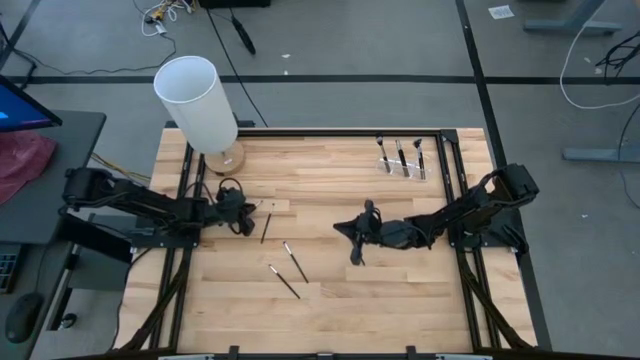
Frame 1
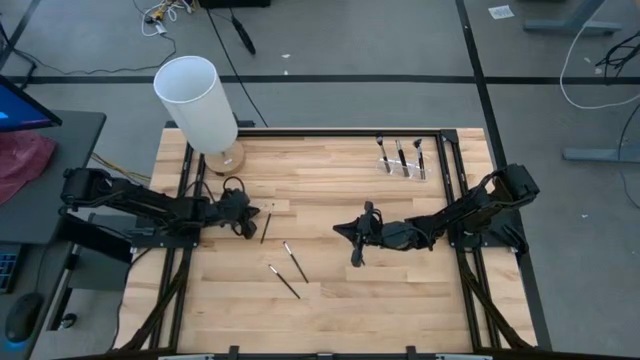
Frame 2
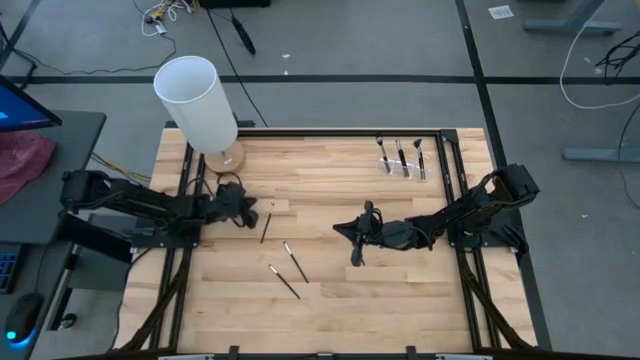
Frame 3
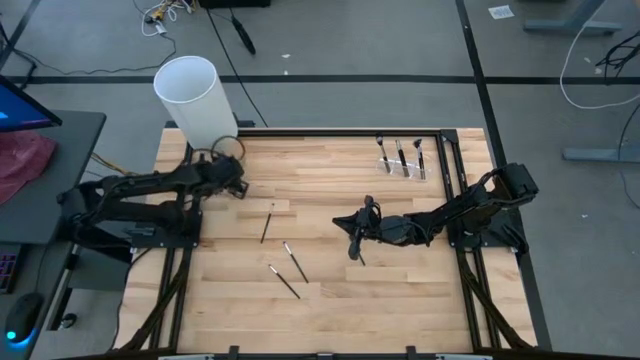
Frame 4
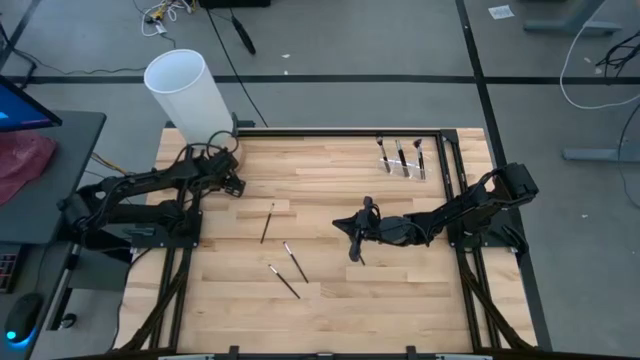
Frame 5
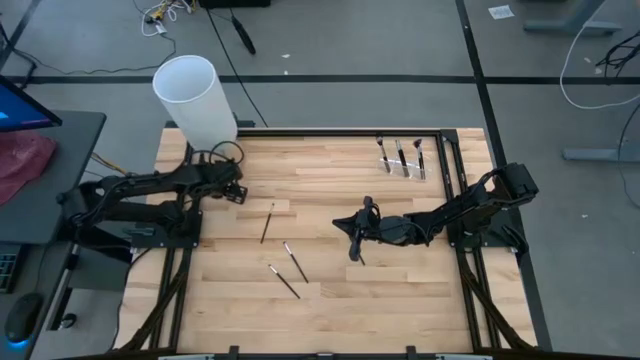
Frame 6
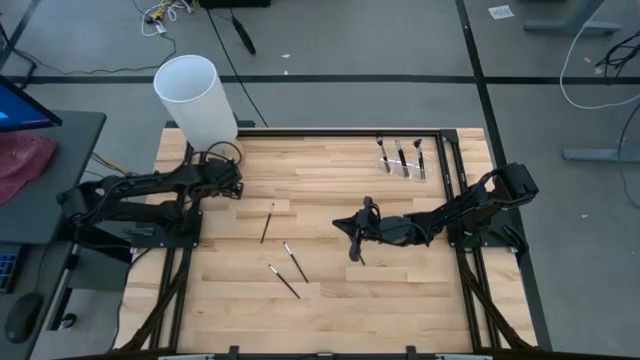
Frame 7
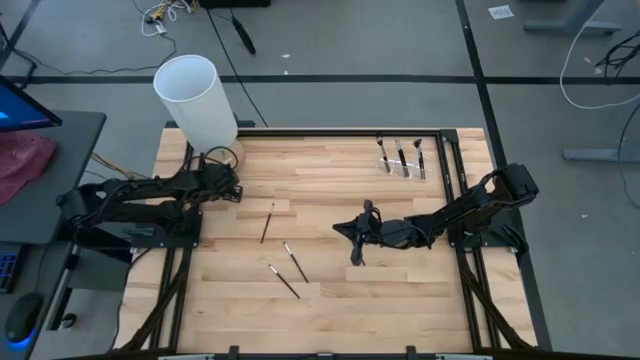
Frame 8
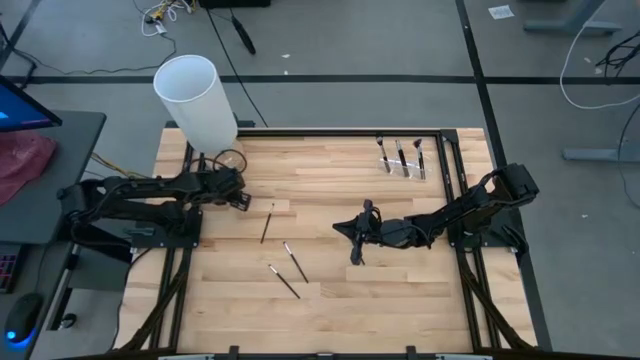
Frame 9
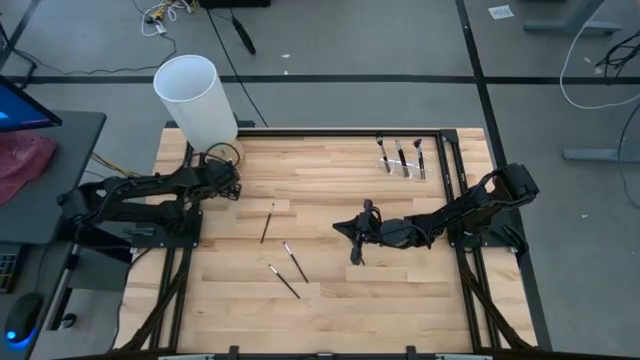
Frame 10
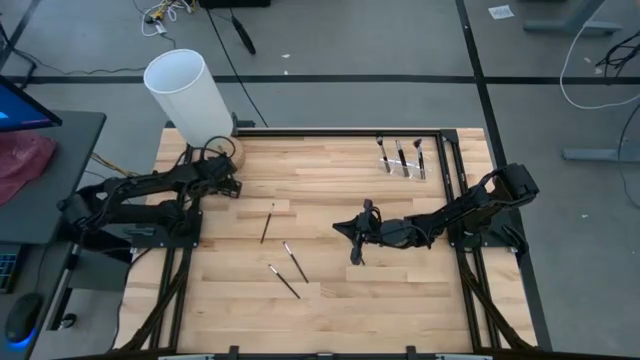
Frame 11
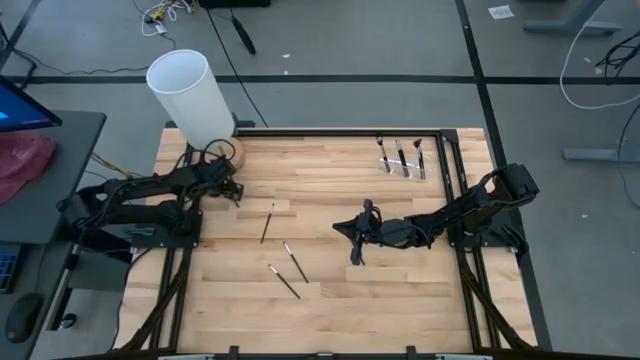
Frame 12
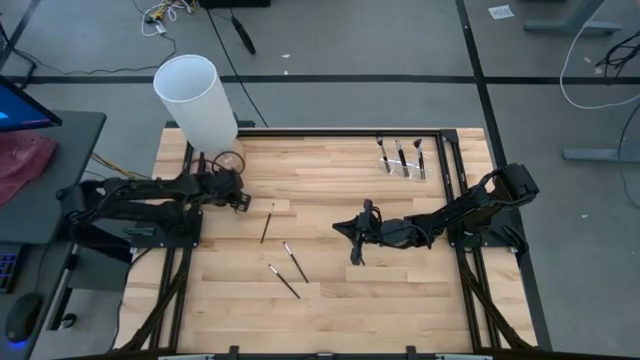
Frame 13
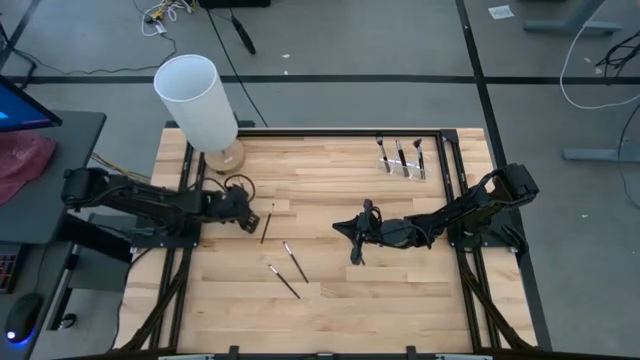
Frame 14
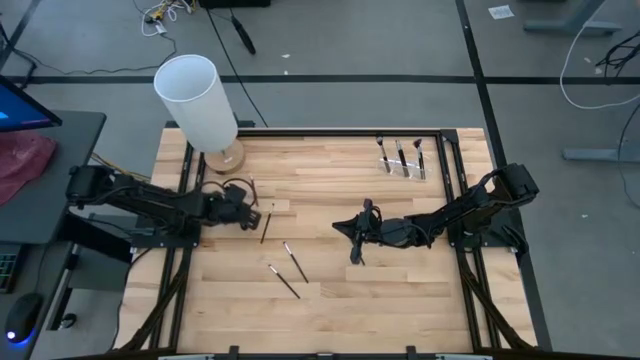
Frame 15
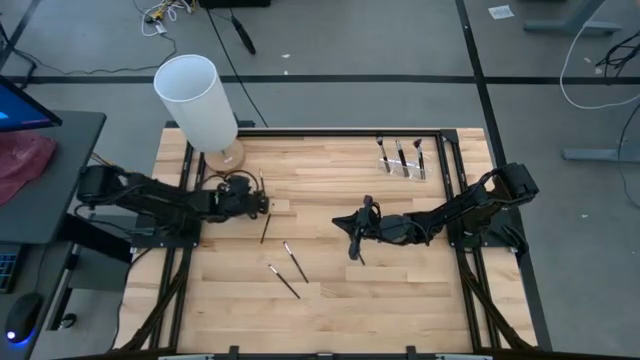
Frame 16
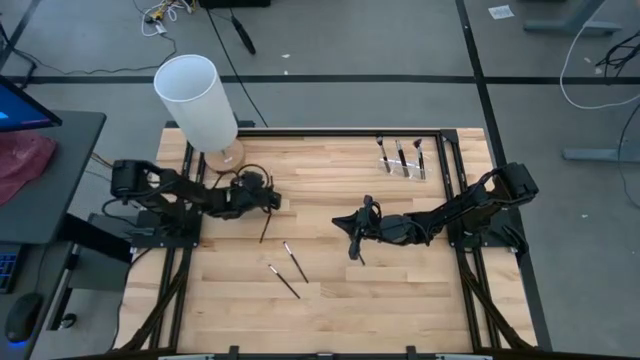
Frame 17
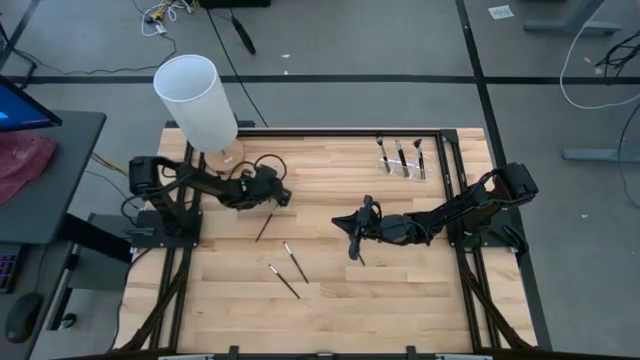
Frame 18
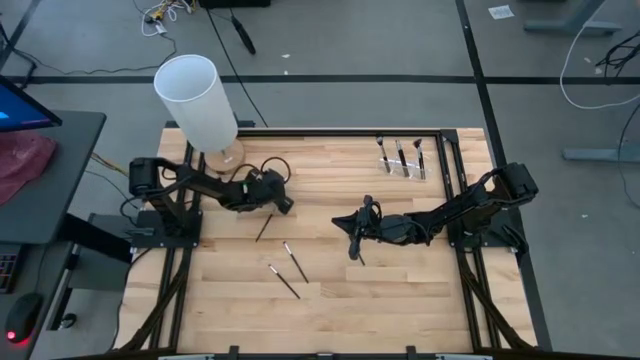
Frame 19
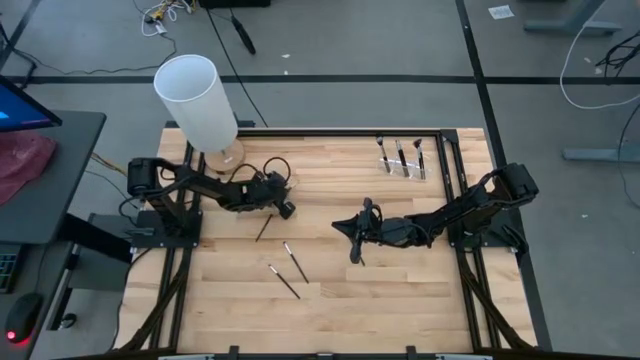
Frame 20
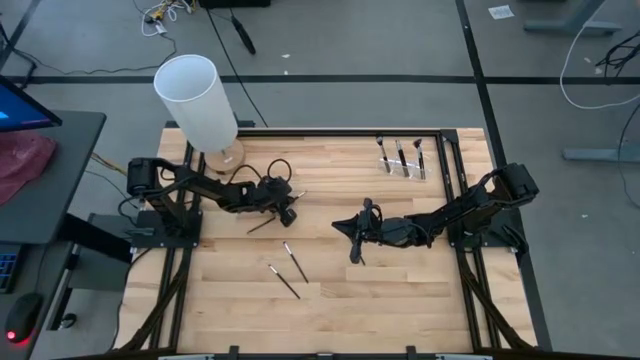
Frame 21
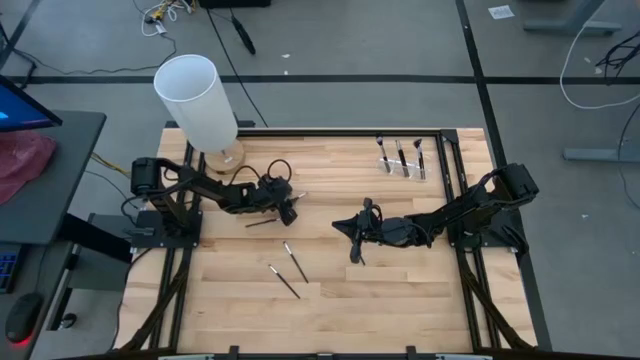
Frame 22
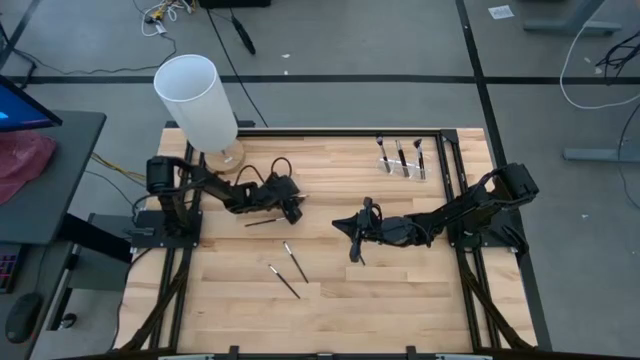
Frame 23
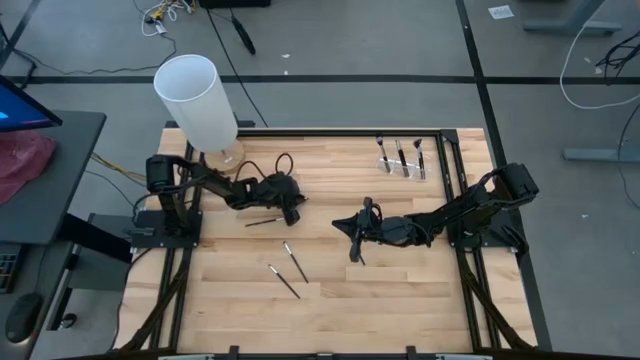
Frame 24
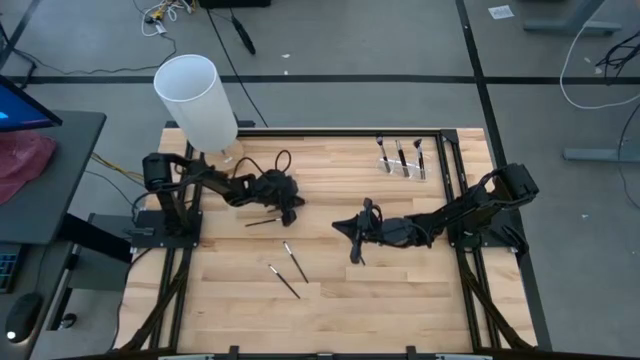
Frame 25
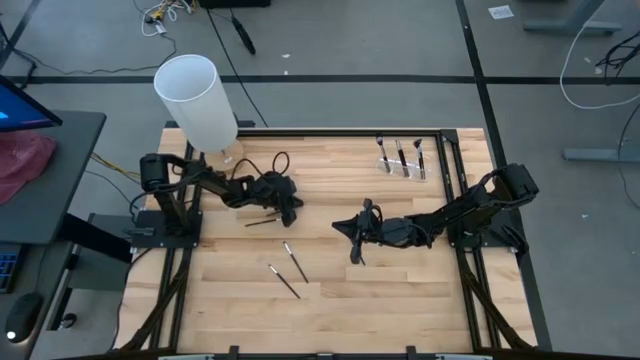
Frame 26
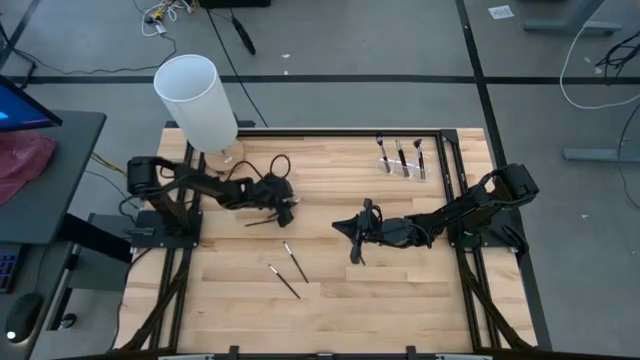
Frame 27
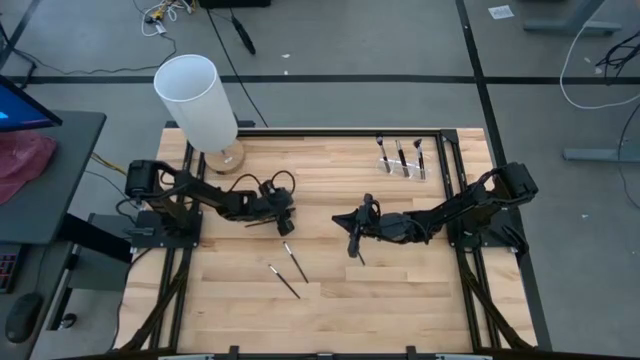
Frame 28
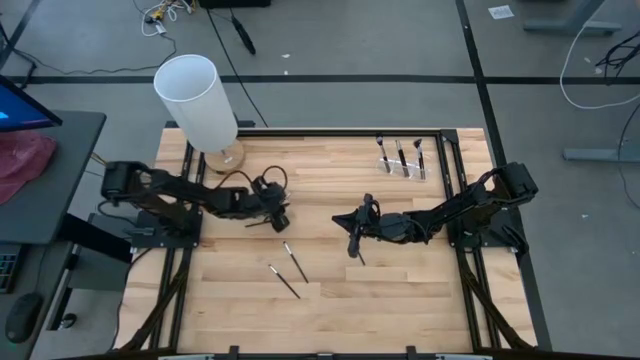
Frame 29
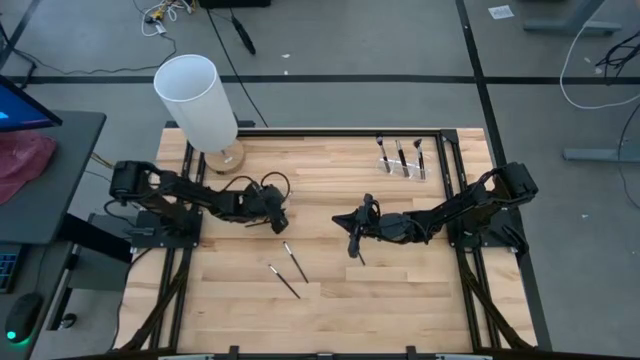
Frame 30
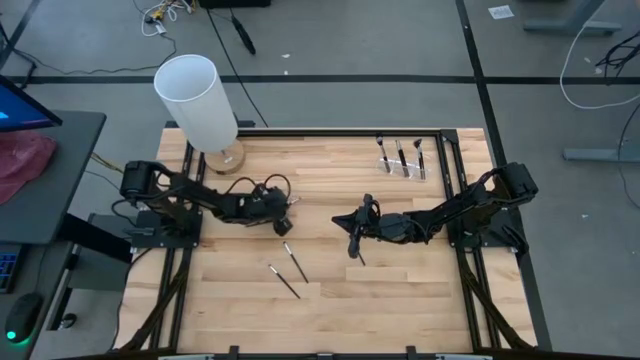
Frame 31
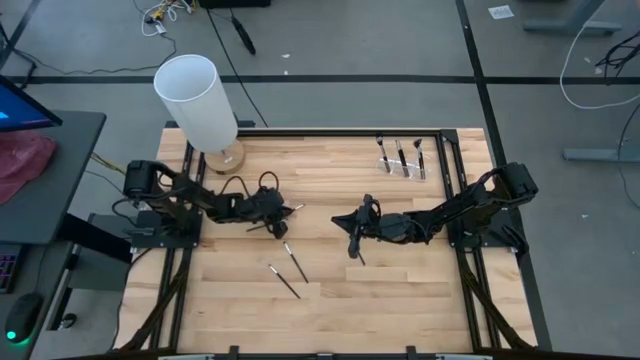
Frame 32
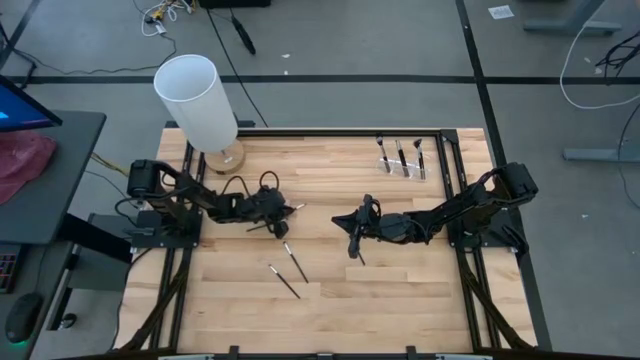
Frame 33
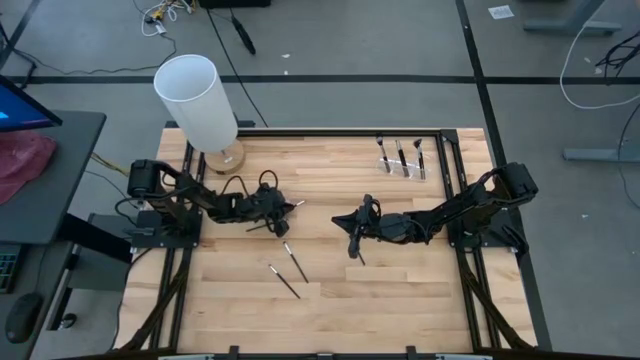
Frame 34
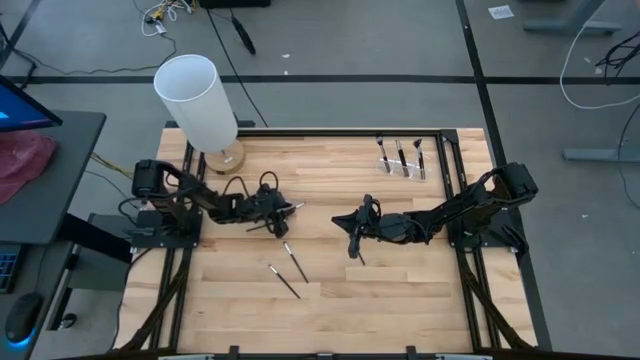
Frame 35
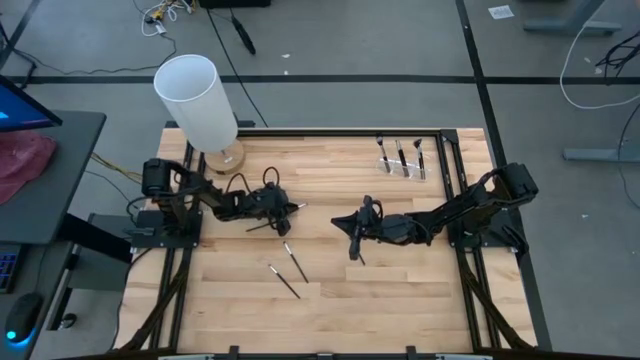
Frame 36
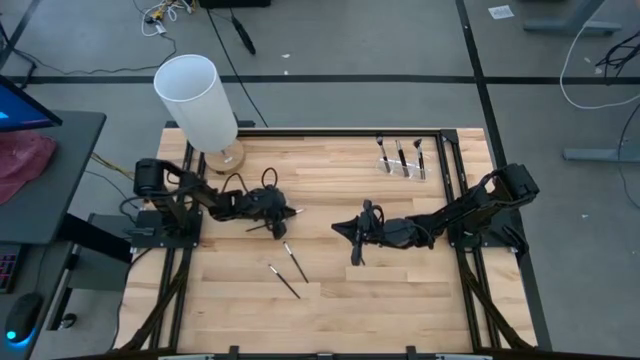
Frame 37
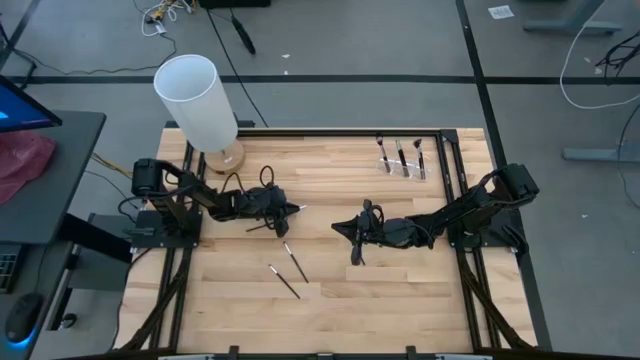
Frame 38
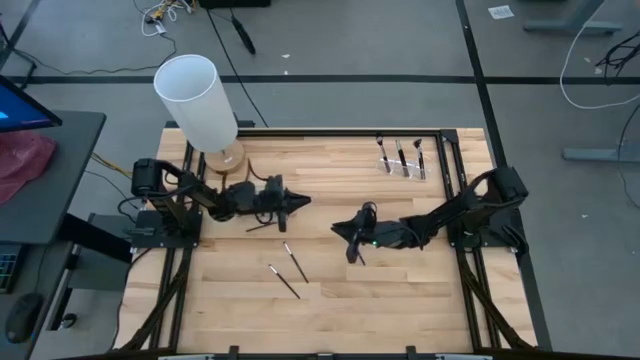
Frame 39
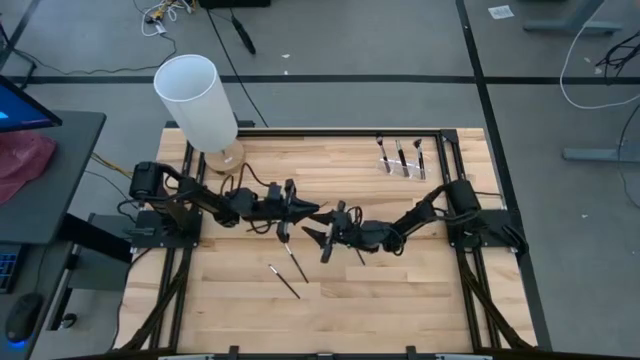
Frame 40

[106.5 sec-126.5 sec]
Task: Put items in baskets/containers
Put the eyeshadow brush into the transparent organizer

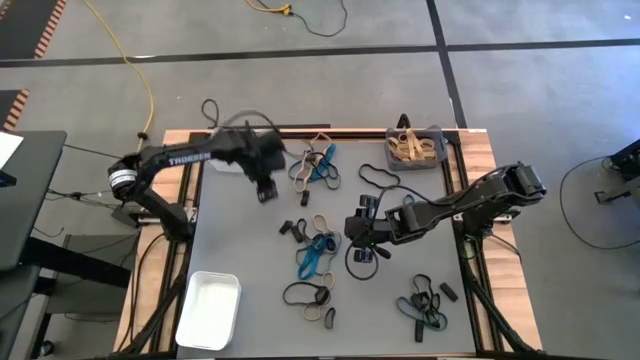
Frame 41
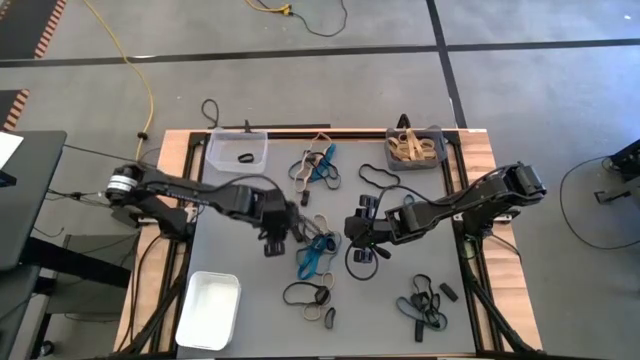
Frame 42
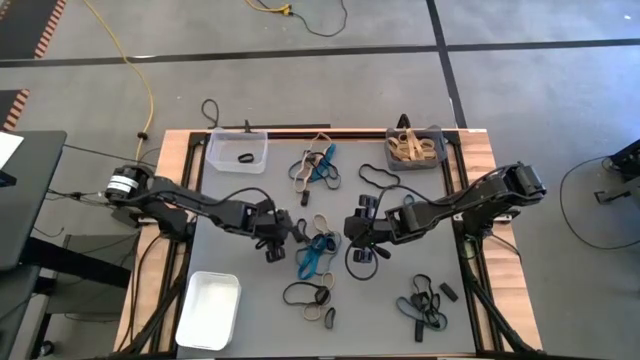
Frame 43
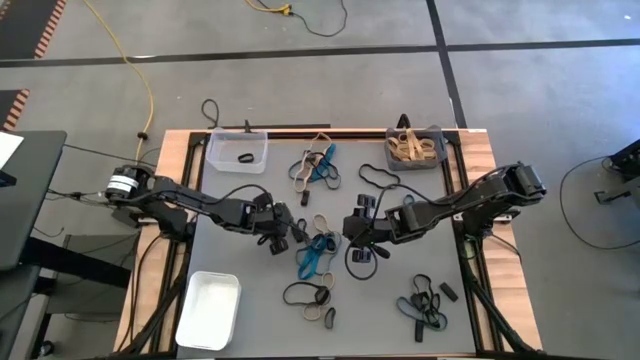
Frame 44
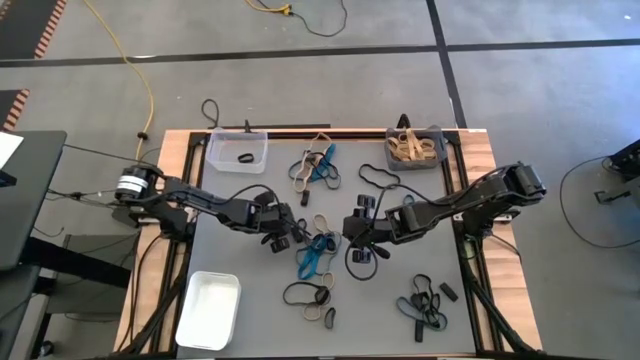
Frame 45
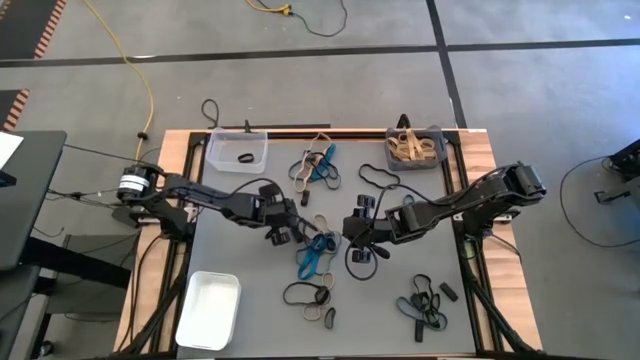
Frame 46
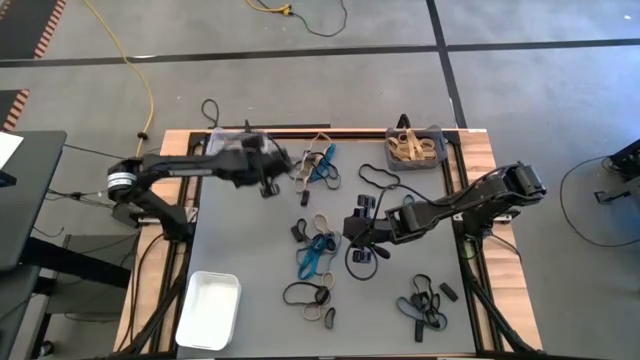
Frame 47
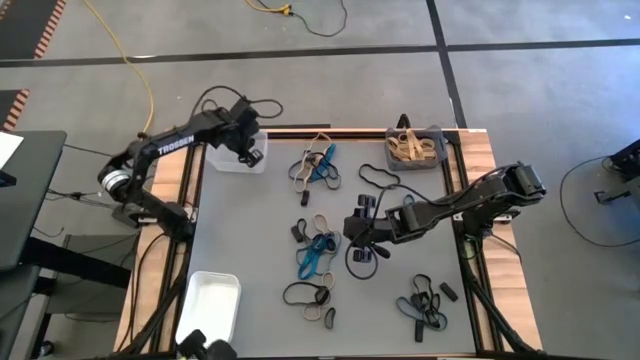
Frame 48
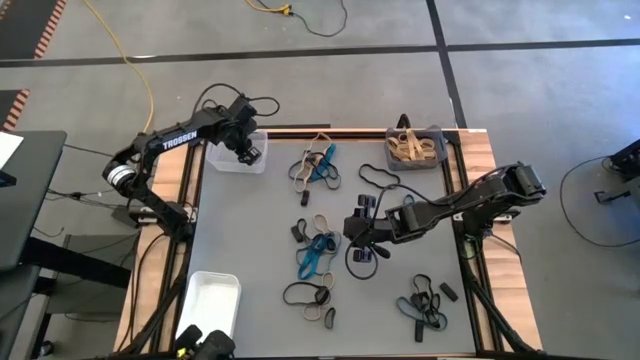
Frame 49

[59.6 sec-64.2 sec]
Task: Sort rubber bands into baskets
Put the black rubber band into the transparent bin
